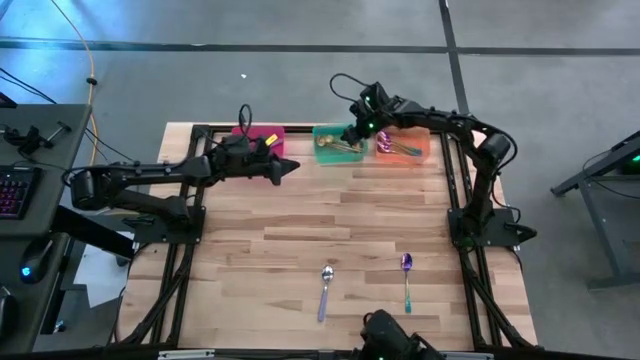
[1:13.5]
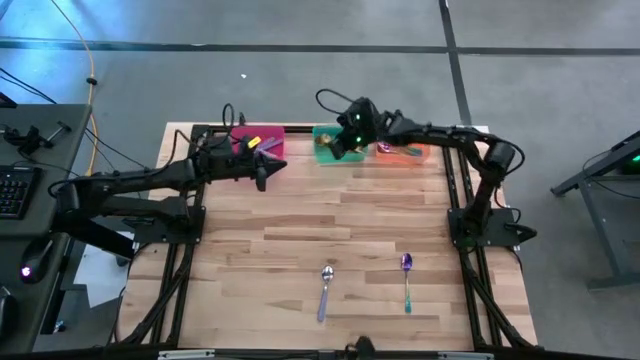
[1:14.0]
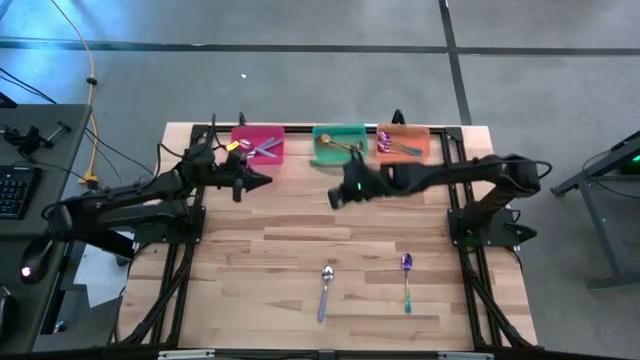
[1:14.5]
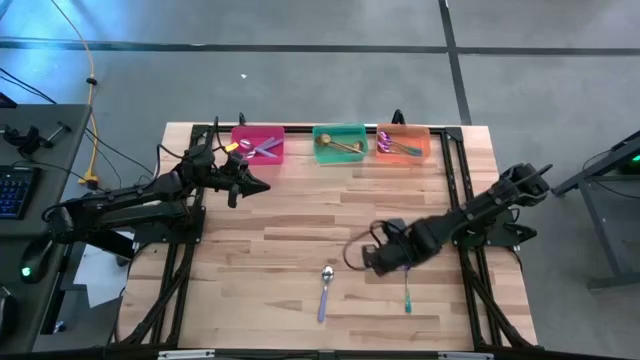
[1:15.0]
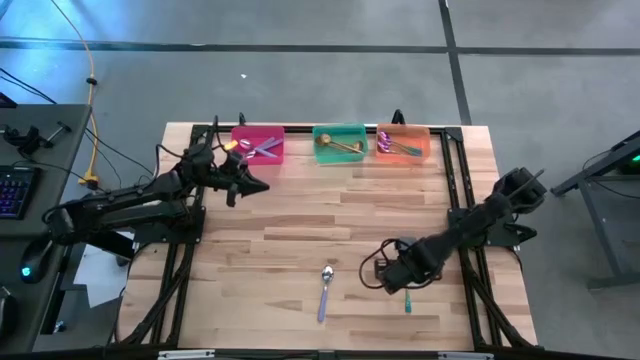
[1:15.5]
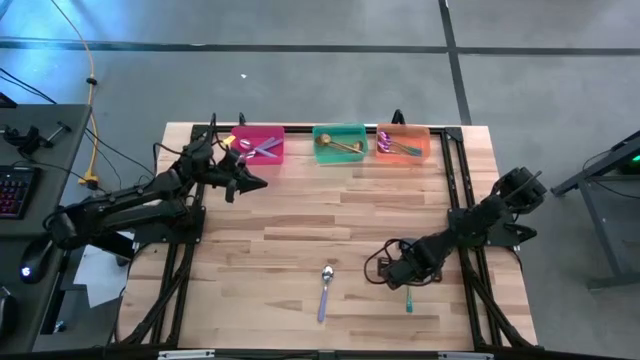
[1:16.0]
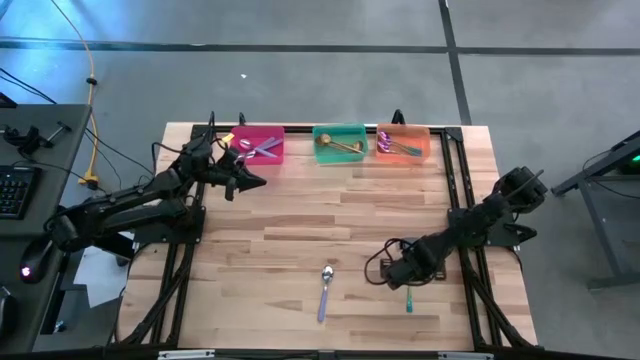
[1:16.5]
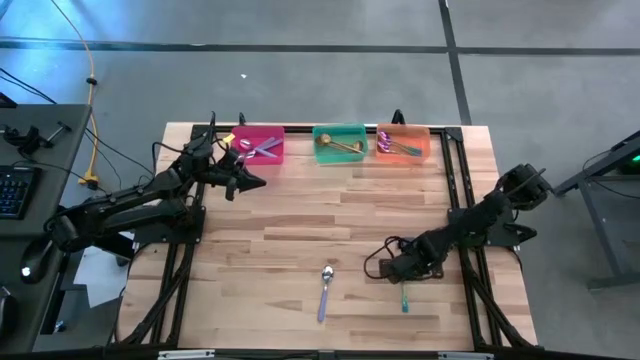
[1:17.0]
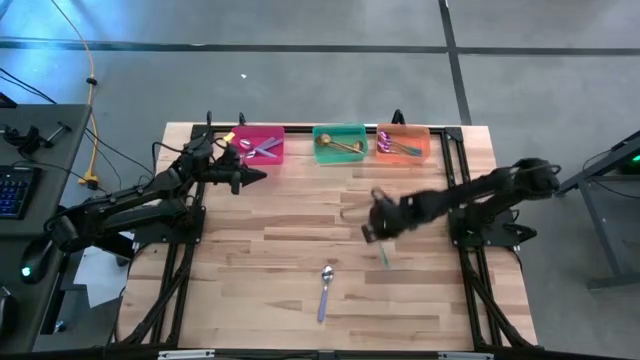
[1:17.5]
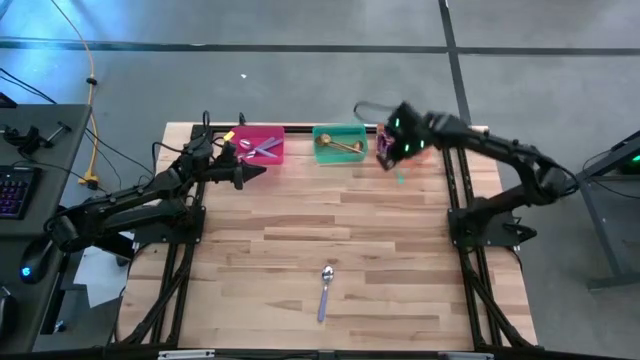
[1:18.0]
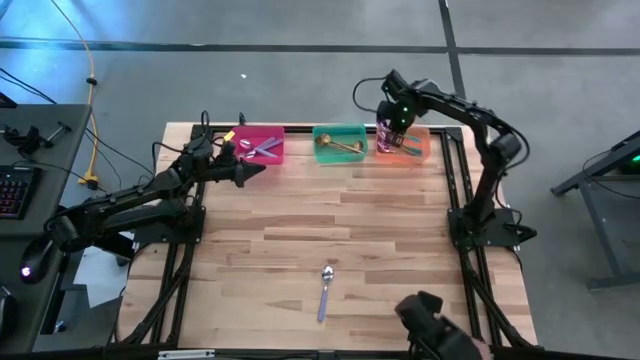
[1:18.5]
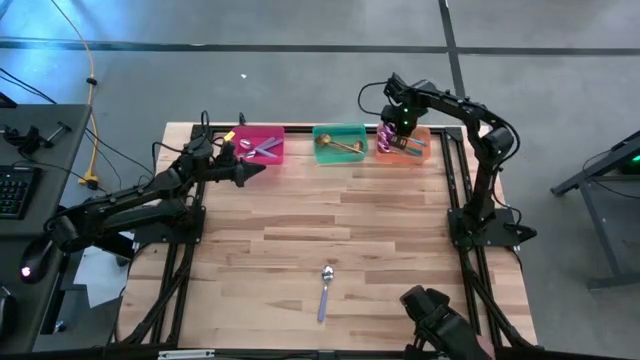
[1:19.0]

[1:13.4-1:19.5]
Task: Sort silverware by color (type)
Put the silver spoon into the orange bin

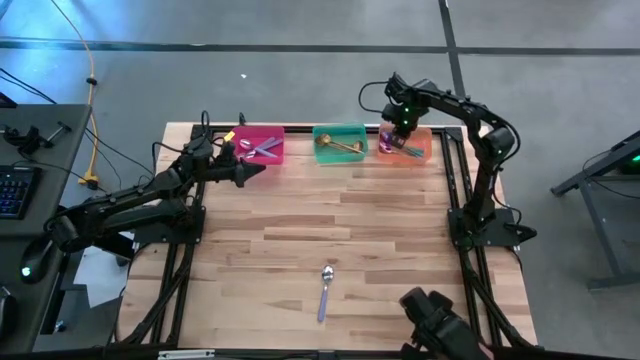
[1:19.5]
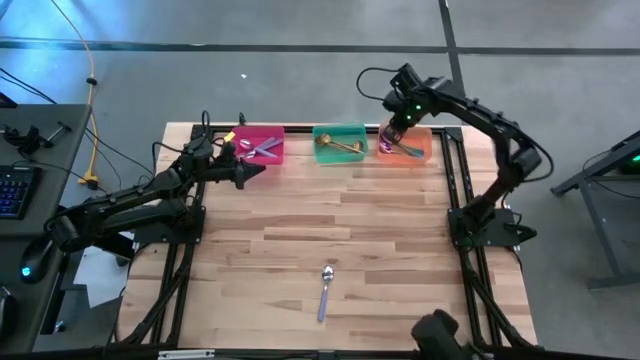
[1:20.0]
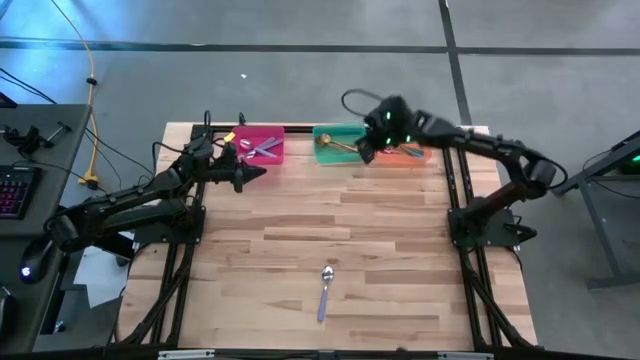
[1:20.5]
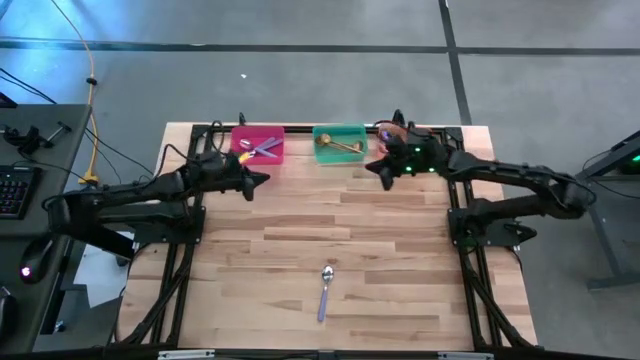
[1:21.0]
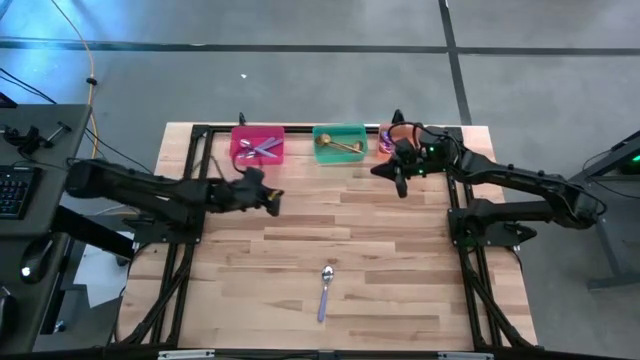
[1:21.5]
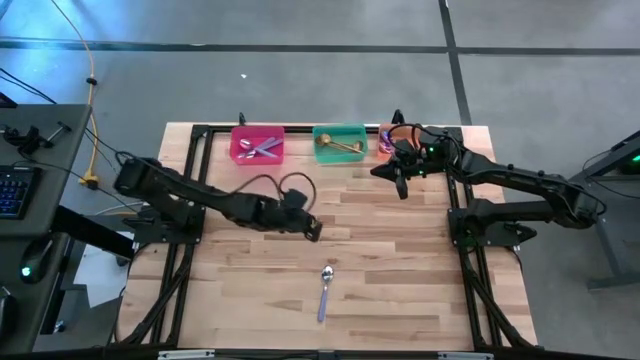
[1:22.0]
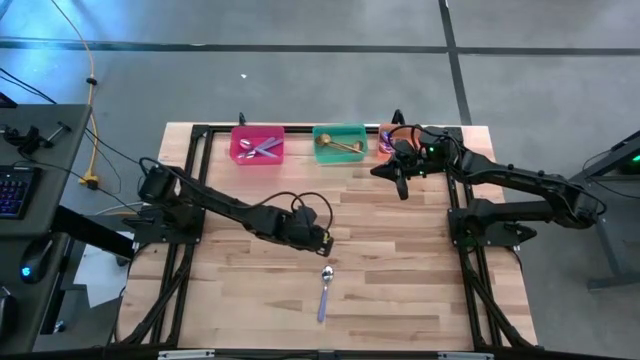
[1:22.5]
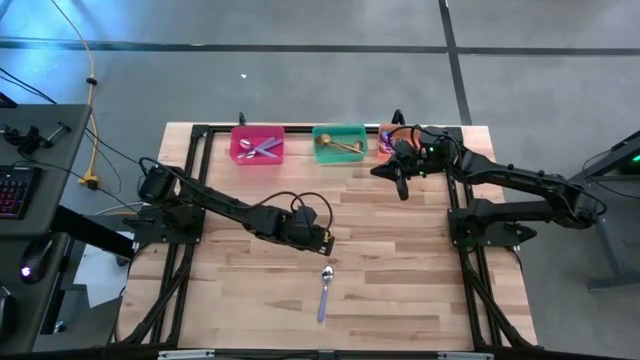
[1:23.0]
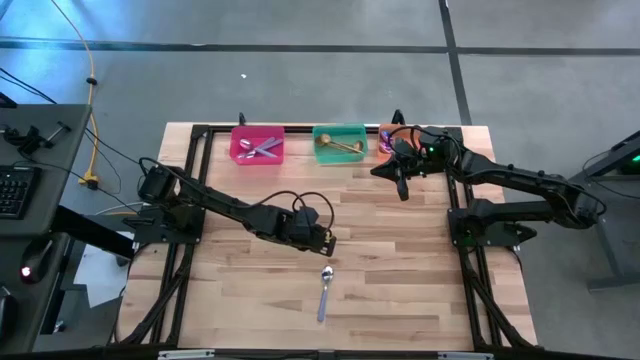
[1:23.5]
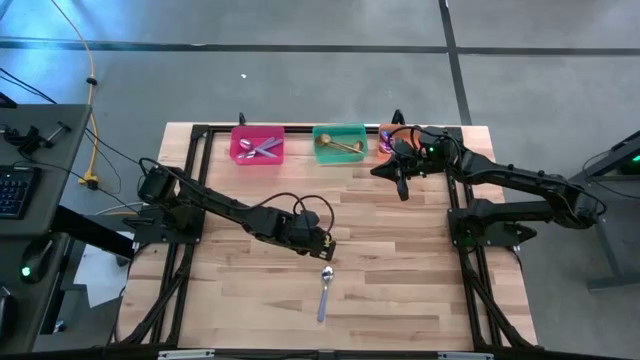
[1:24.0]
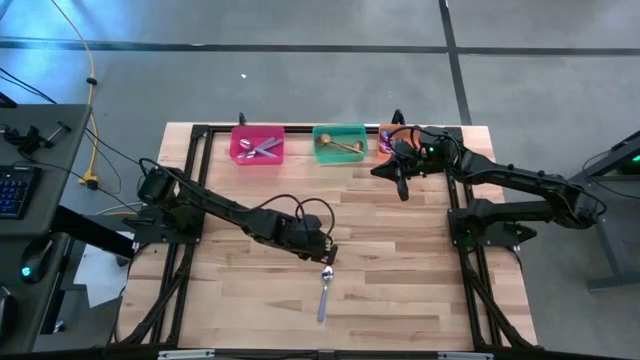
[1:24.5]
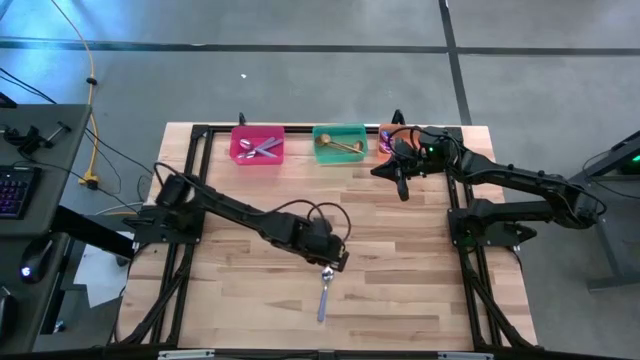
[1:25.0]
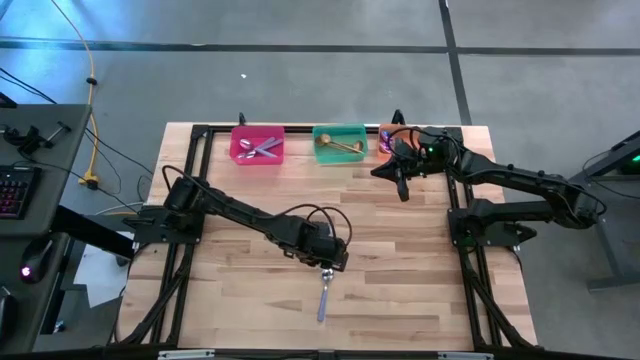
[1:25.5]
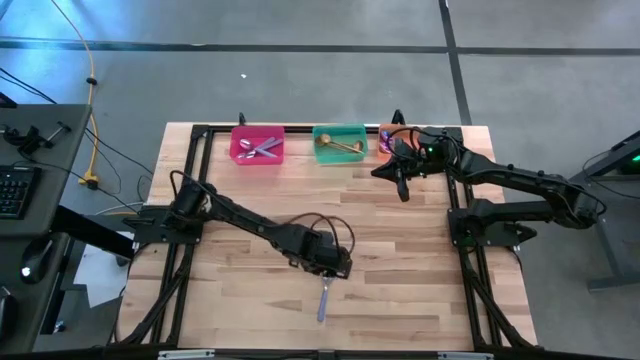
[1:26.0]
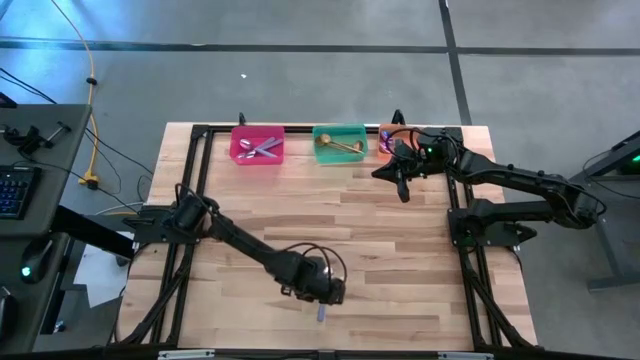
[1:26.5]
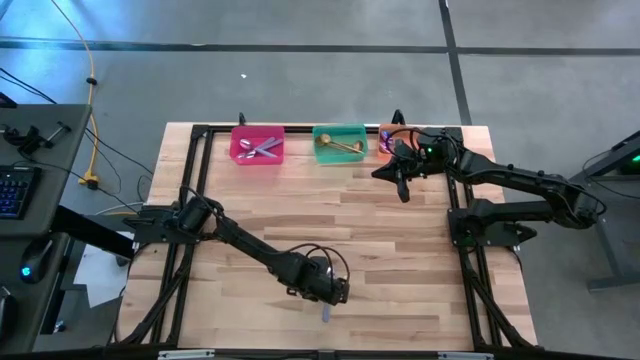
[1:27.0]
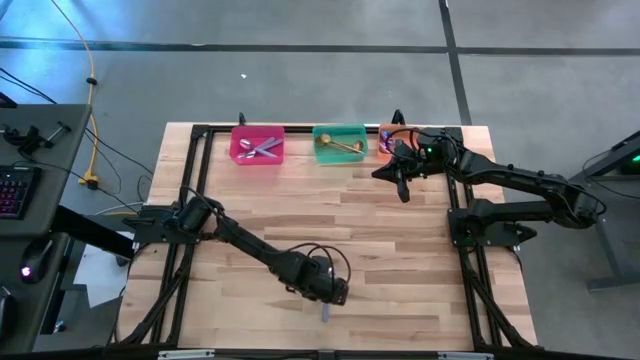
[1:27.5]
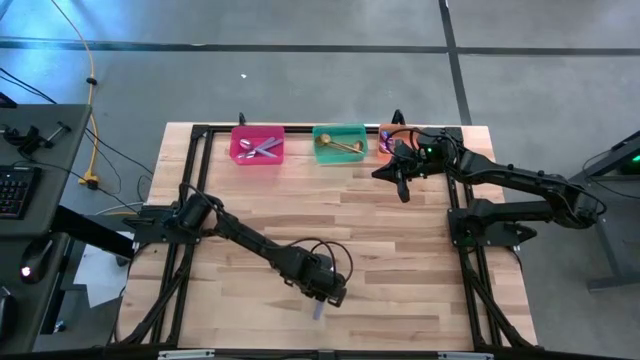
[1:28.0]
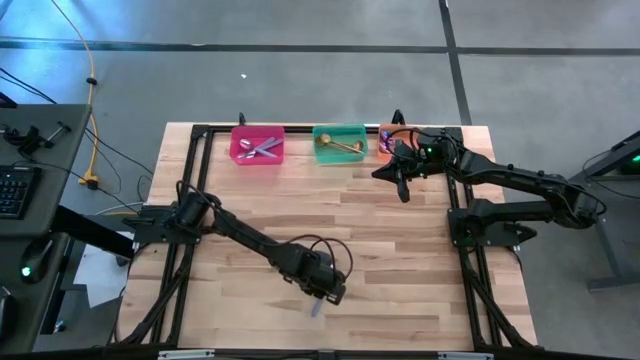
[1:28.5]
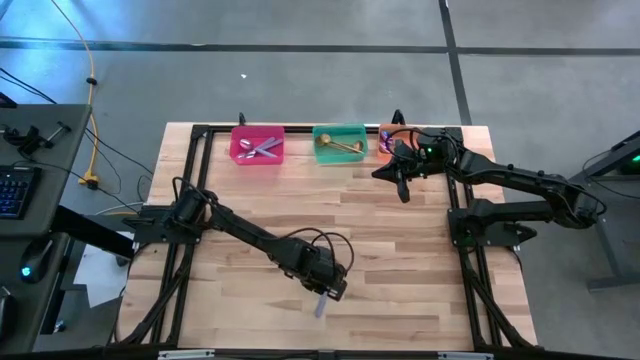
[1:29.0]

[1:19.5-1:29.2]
Put the purple spoon into the pink bin

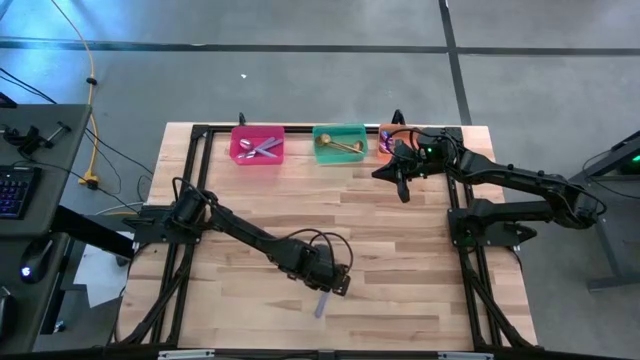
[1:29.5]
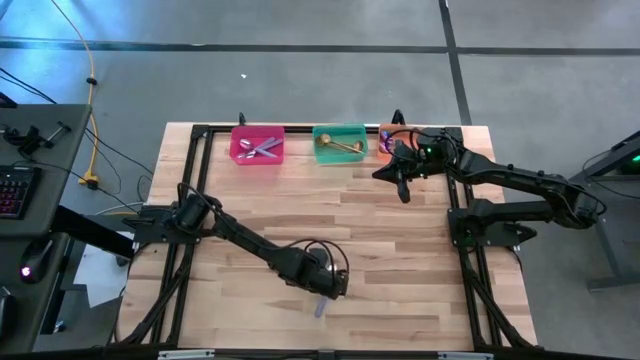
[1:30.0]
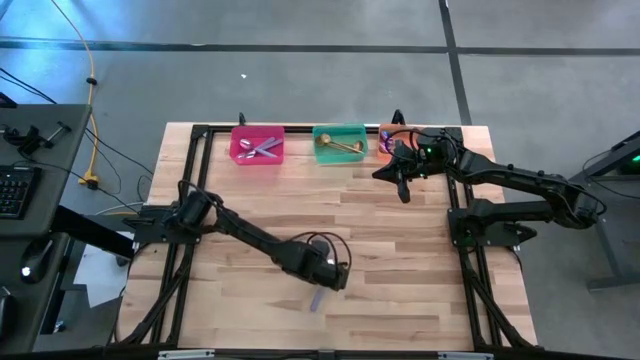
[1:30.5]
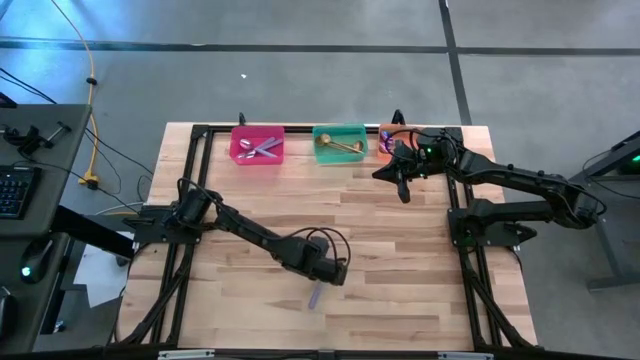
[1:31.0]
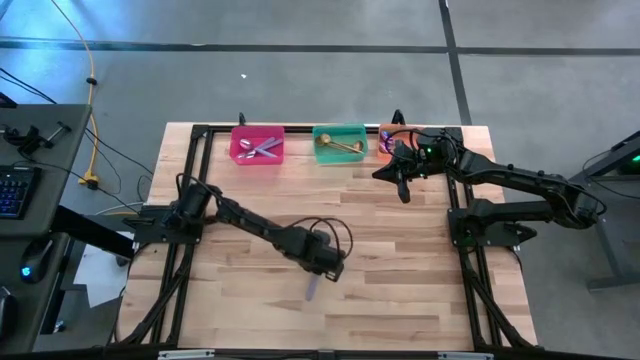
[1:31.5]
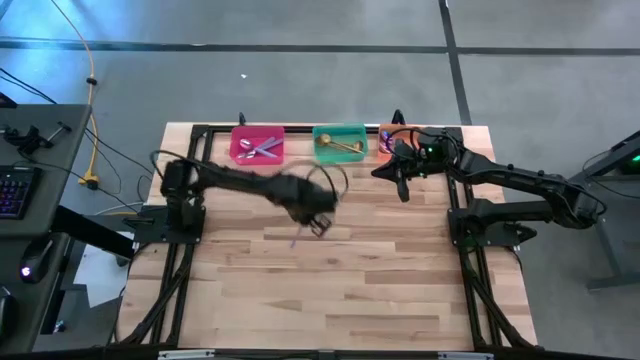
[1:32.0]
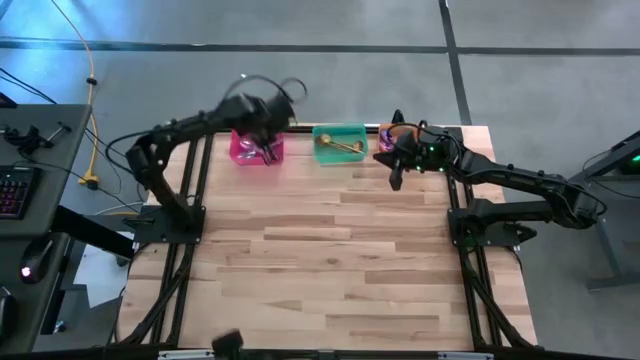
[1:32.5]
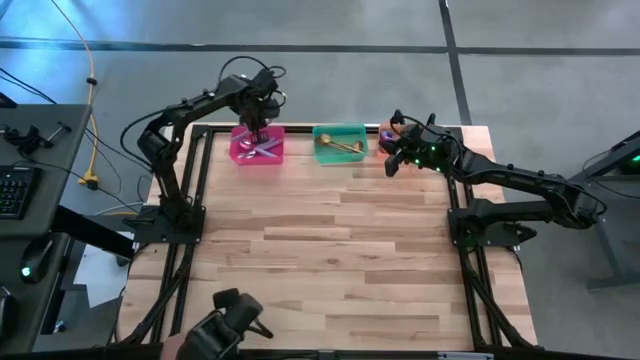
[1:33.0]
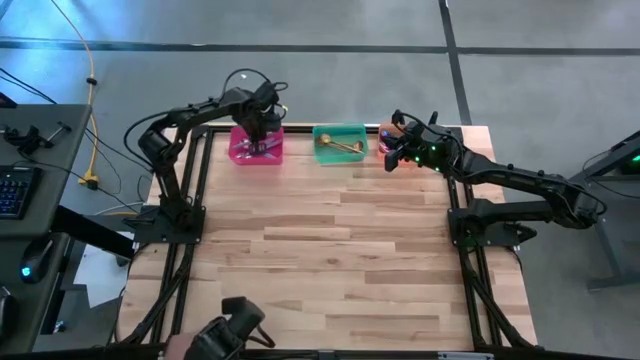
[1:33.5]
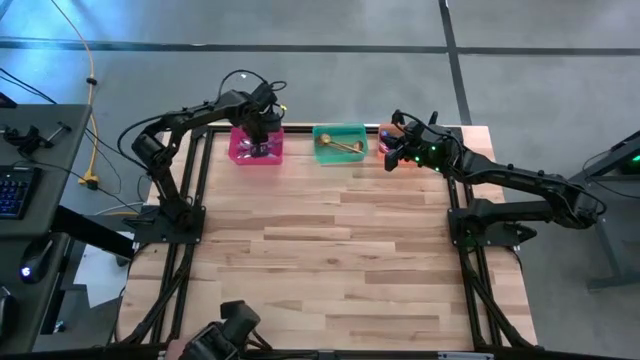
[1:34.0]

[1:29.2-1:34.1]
Put the purple spoon into the pink bin
